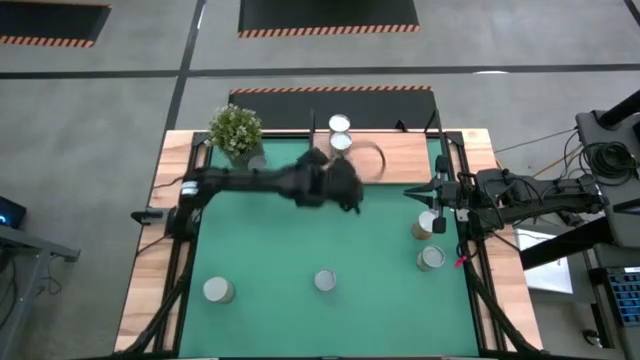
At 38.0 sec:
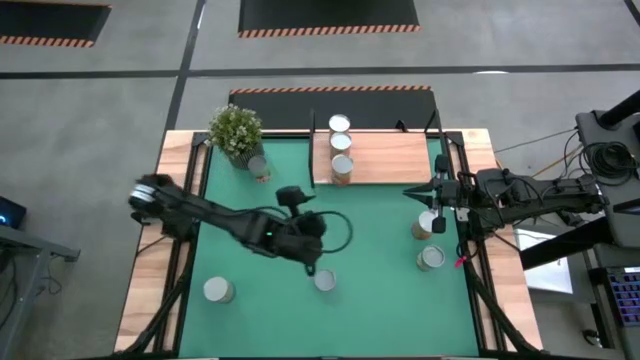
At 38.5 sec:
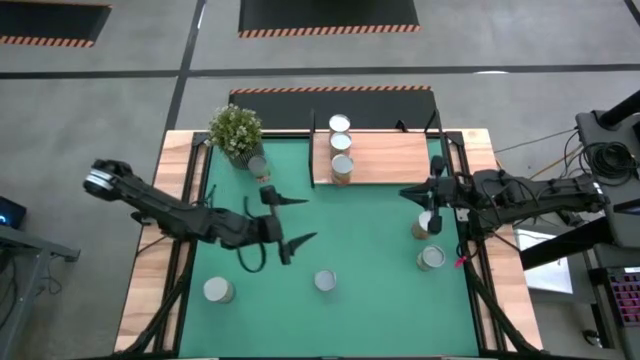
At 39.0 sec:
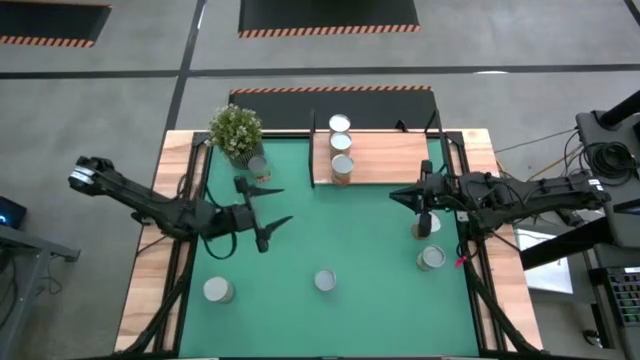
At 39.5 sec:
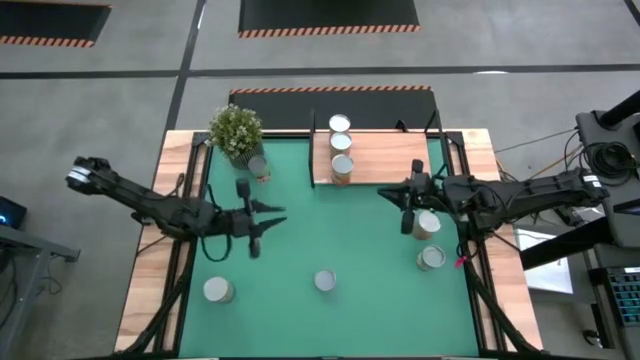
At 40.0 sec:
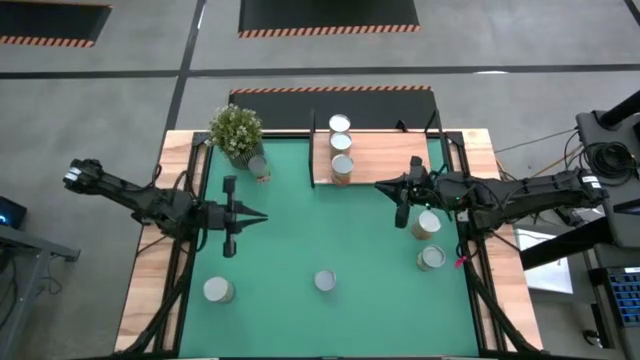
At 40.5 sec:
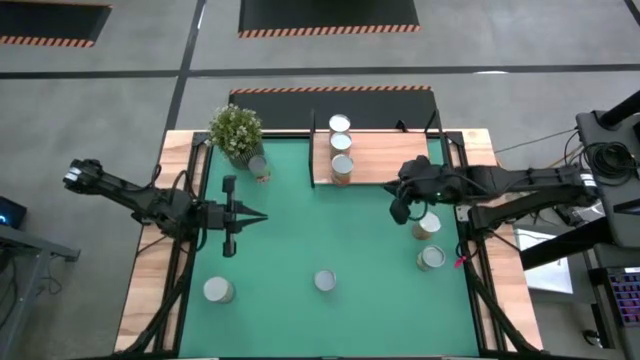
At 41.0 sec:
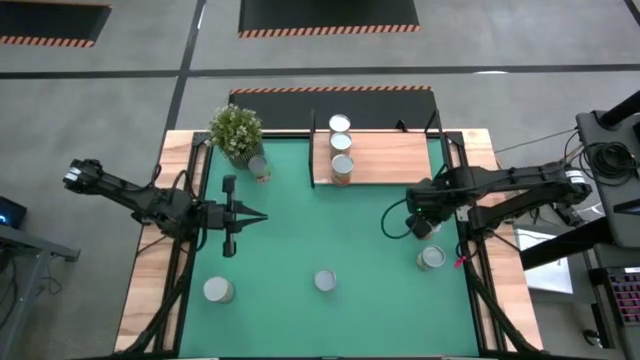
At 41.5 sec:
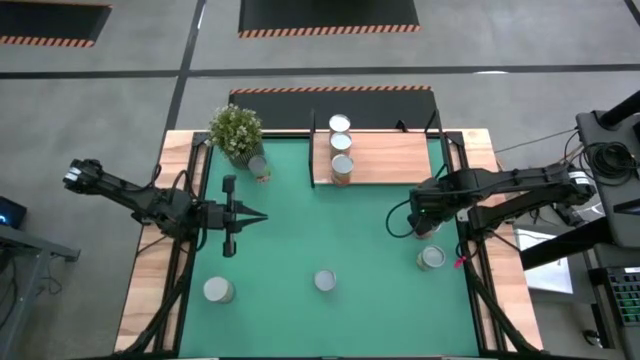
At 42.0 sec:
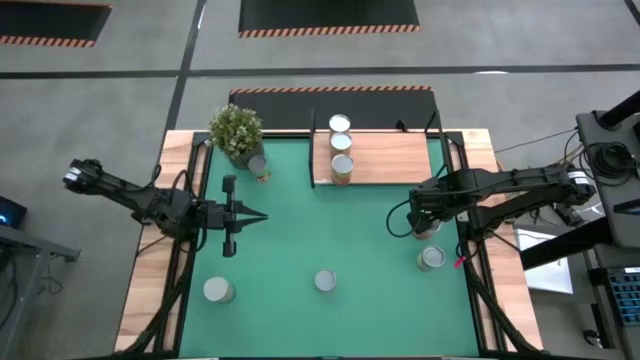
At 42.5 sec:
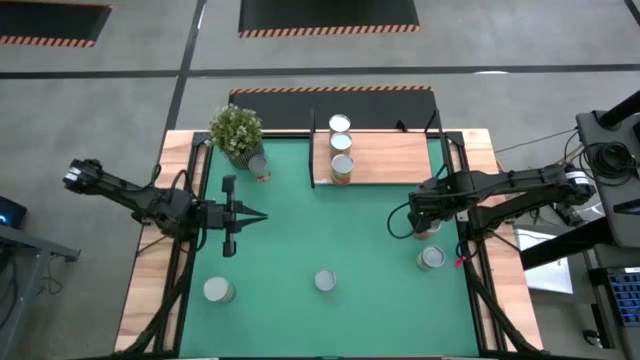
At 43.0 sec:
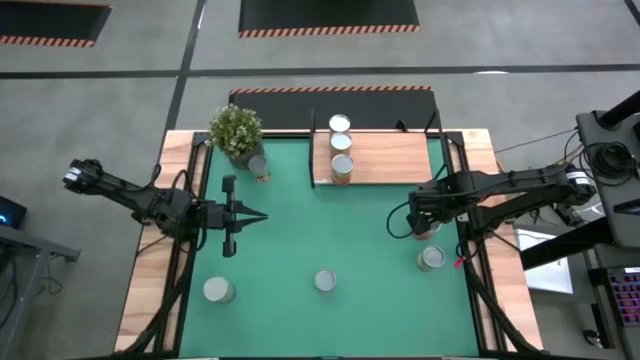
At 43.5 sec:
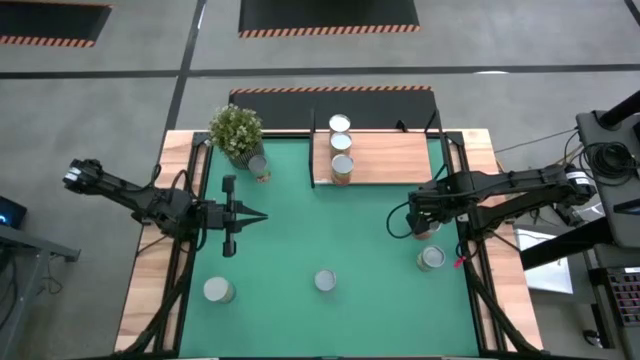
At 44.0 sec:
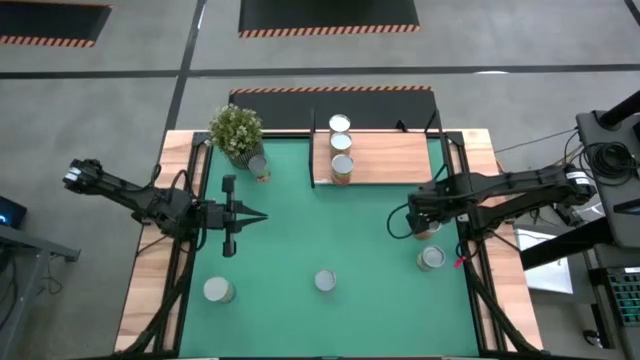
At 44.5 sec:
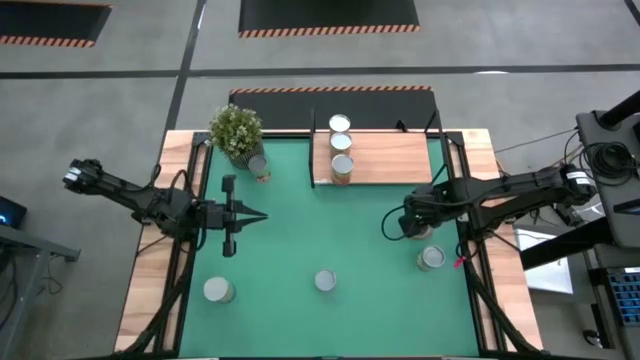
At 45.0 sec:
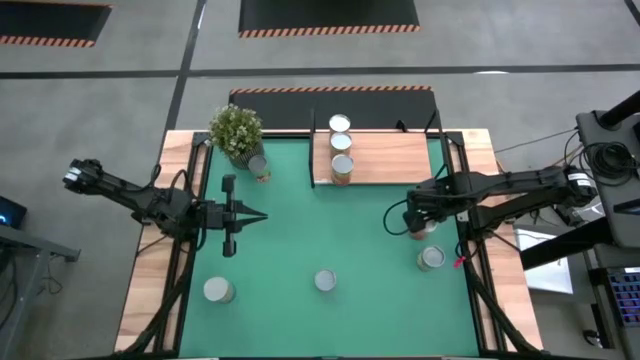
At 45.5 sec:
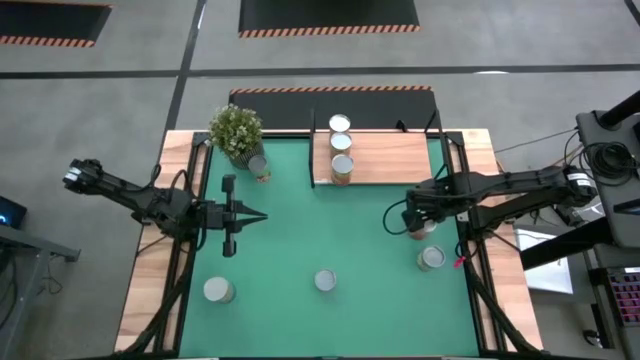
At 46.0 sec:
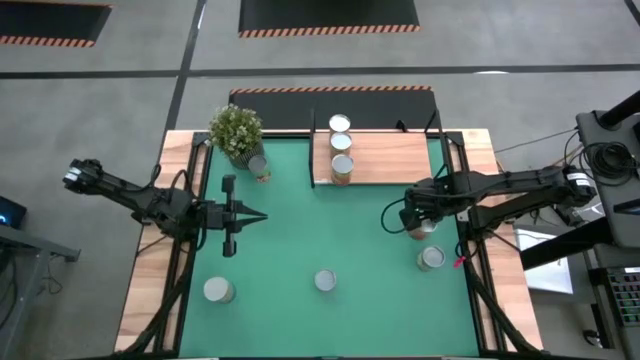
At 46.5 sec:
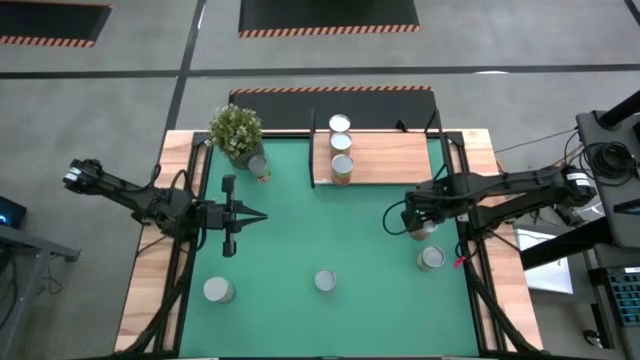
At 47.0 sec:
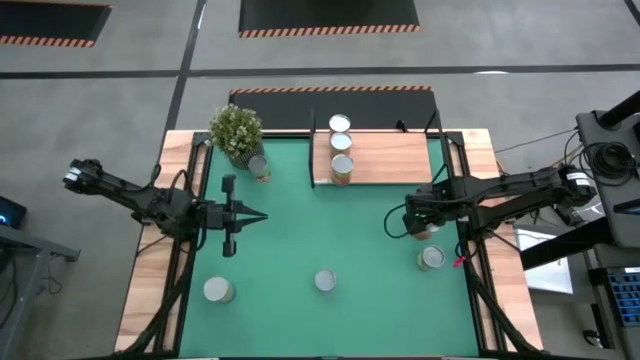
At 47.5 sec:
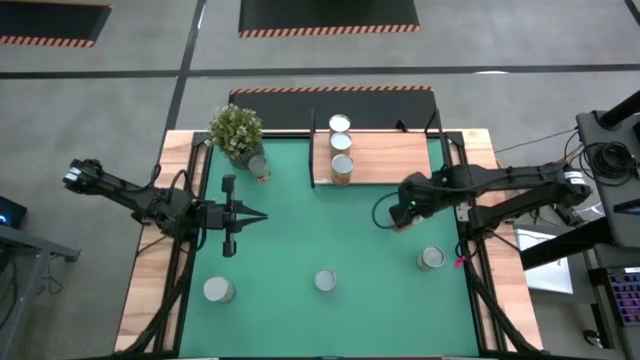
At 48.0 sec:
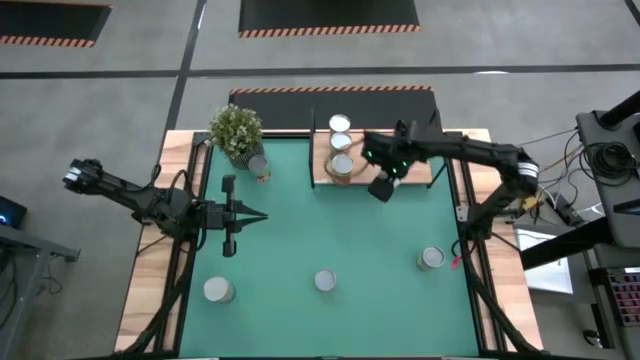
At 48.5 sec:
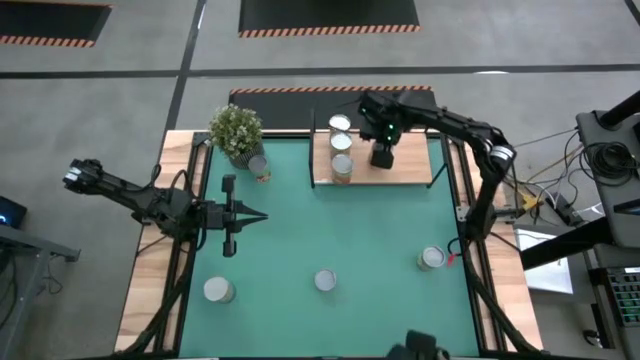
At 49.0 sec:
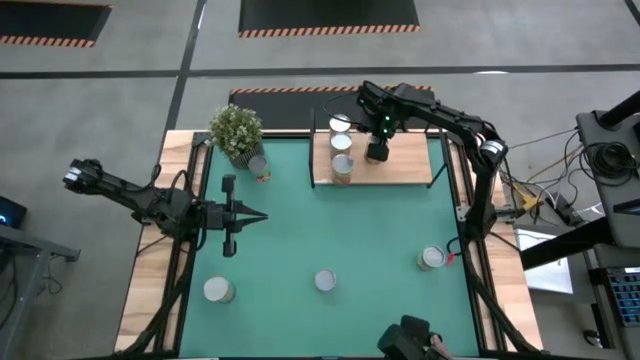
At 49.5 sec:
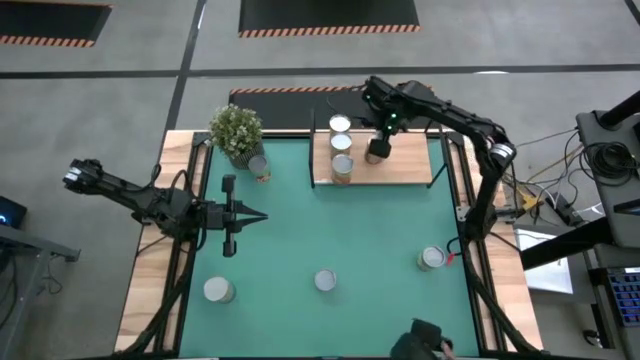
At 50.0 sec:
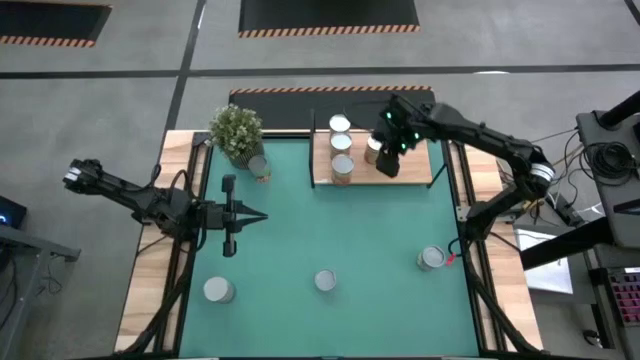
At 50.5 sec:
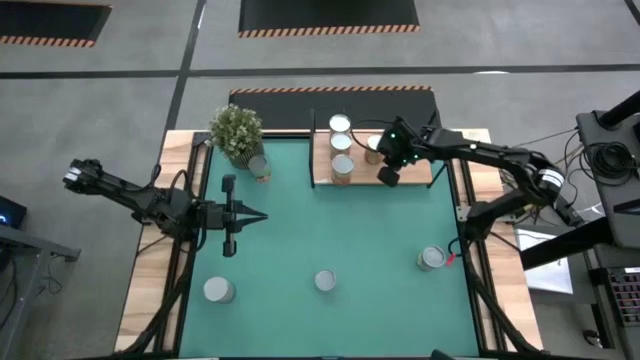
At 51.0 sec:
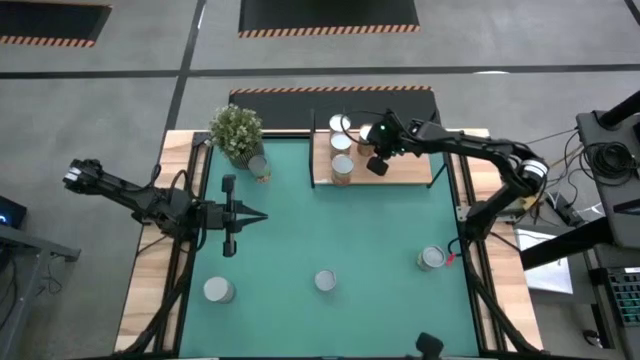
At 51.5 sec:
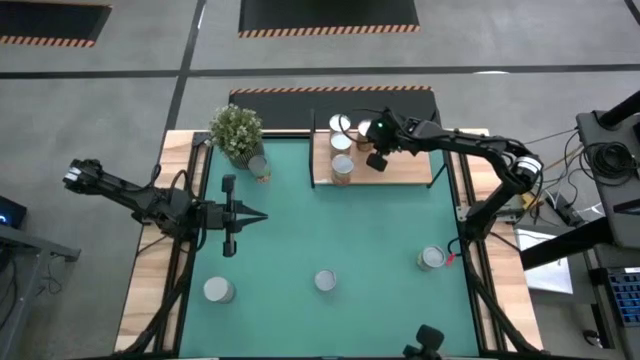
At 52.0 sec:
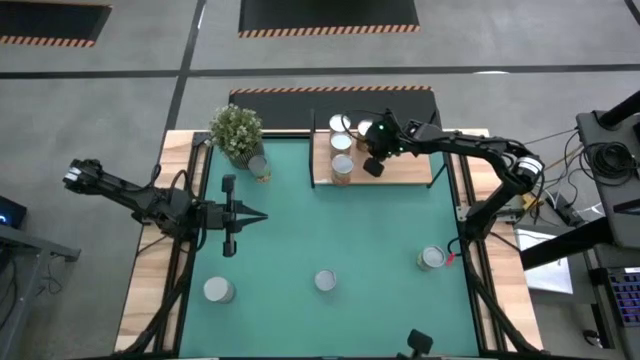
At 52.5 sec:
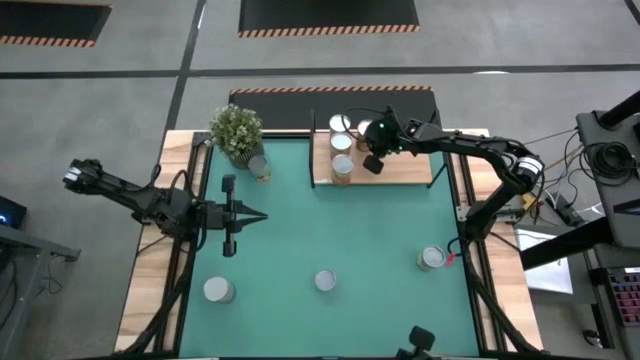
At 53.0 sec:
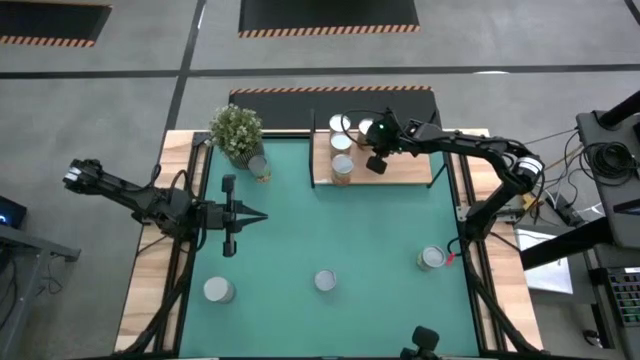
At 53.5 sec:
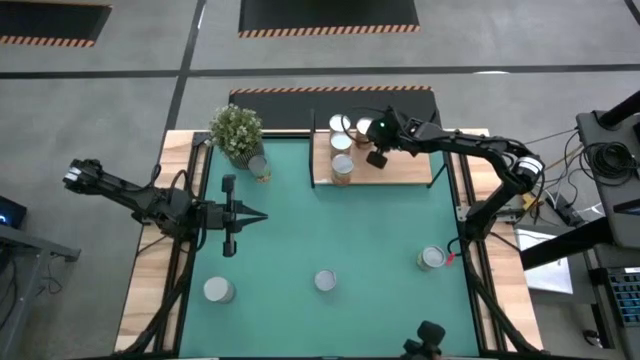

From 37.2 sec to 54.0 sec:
Task: Pick and place cans onto a shelf
Put the orange can on the shelf

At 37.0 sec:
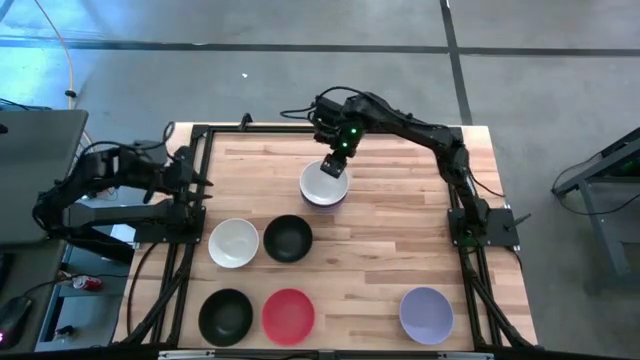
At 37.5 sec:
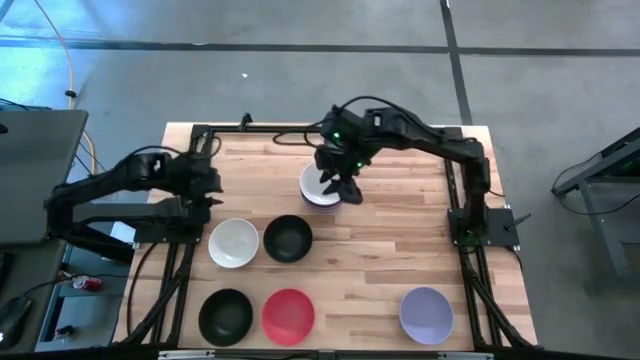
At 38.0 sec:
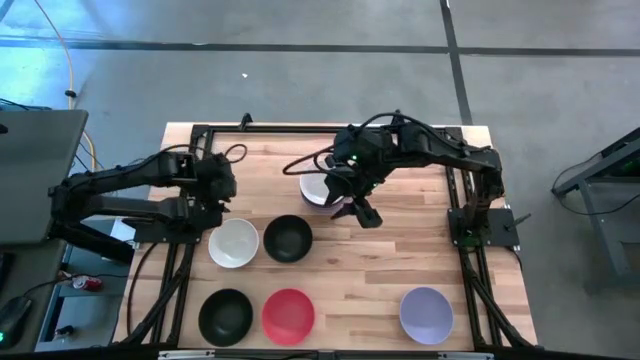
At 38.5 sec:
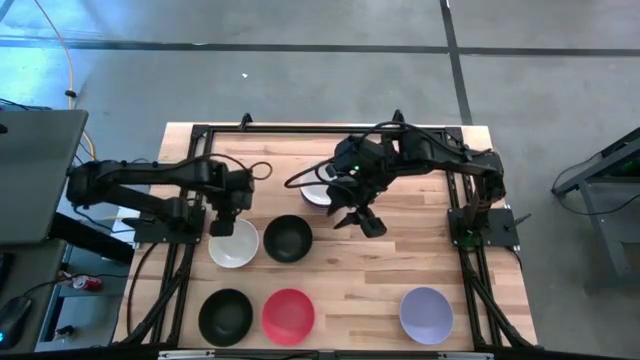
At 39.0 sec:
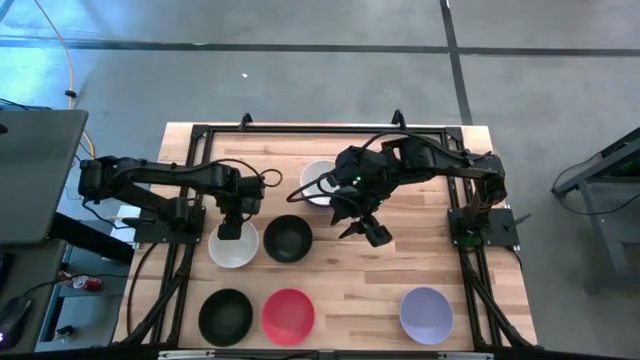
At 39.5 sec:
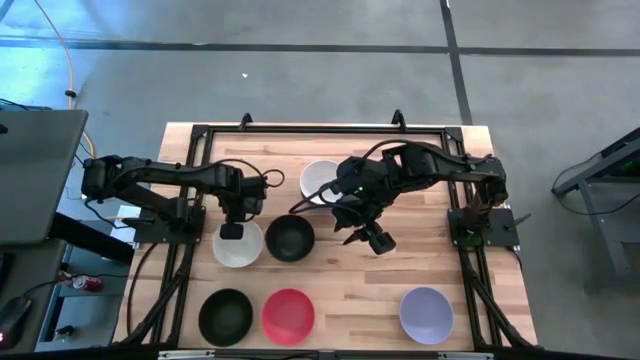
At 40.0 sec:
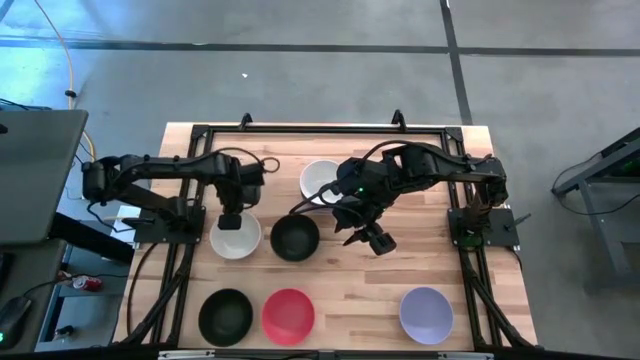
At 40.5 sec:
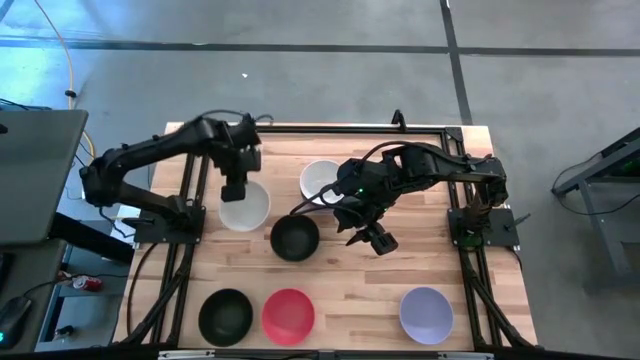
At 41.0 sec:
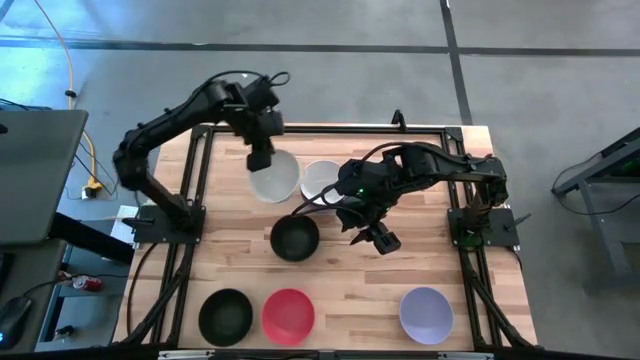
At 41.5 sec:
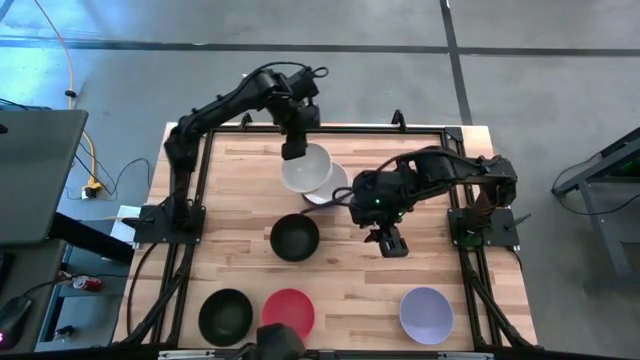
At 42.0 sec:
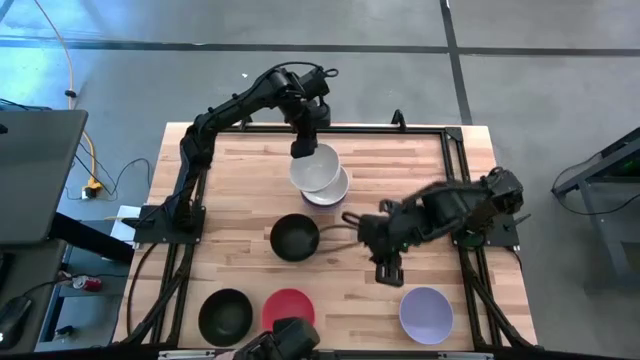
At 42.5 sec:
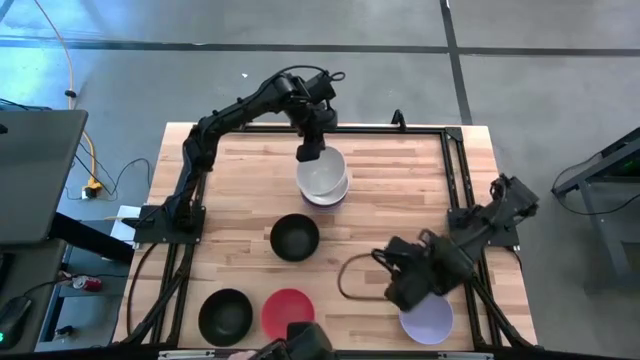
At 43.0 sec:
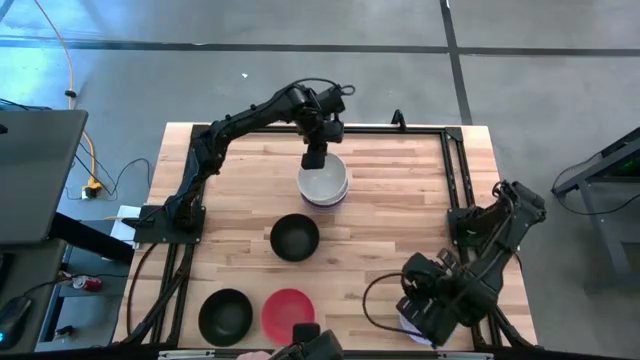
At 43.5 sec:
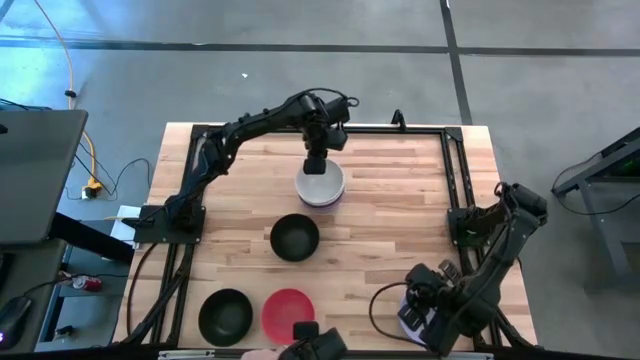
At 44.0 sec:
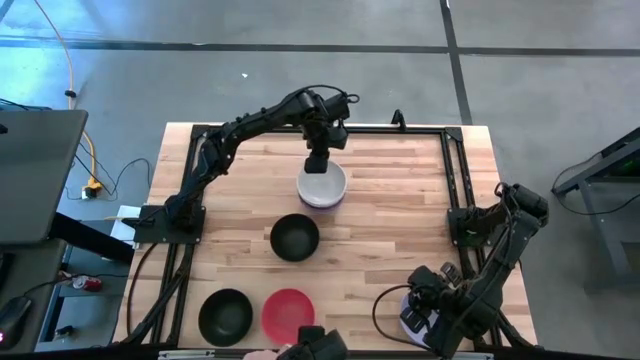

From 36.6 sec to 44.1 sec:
Task: Nest bowls inside each other
Stack the left white bowl on top of the right white bowl
